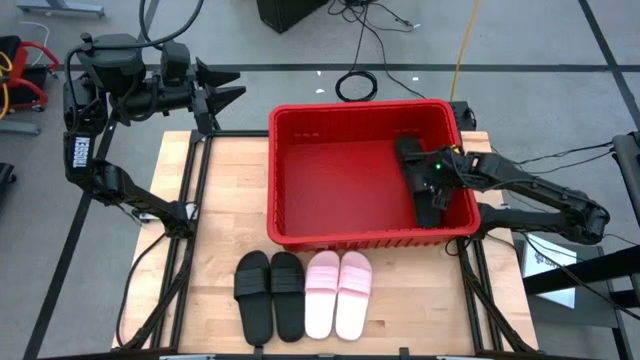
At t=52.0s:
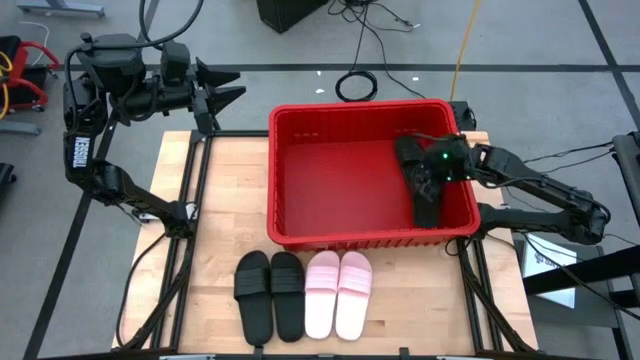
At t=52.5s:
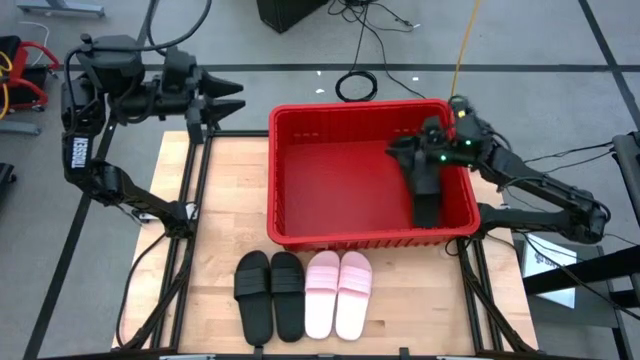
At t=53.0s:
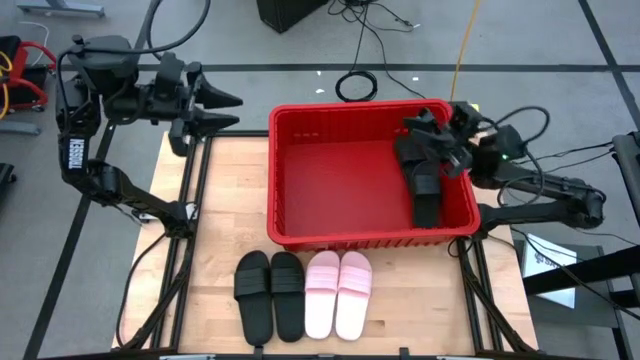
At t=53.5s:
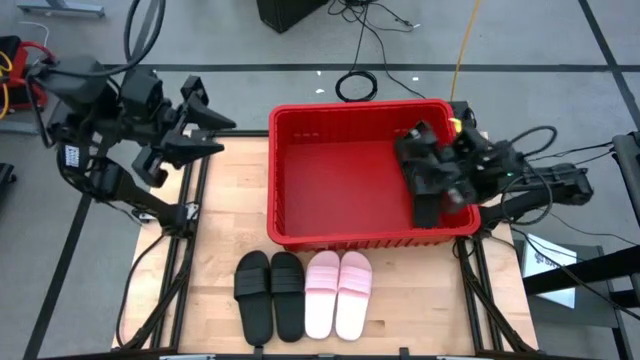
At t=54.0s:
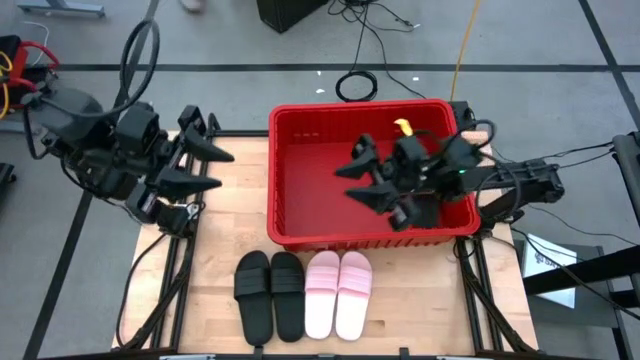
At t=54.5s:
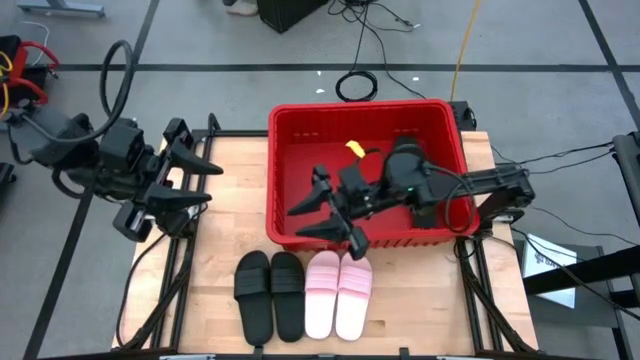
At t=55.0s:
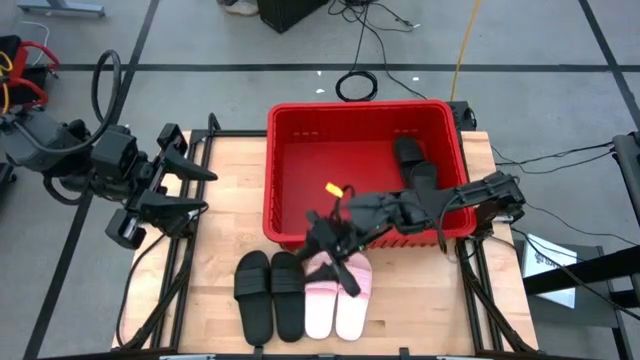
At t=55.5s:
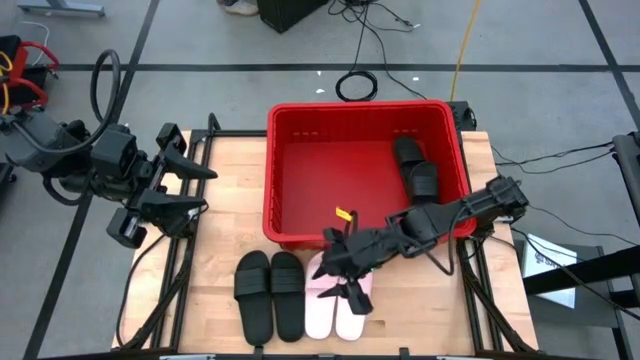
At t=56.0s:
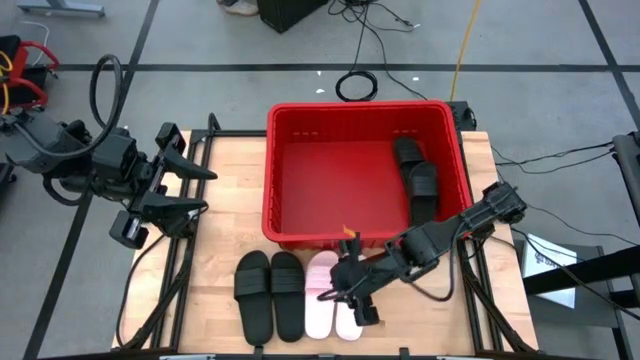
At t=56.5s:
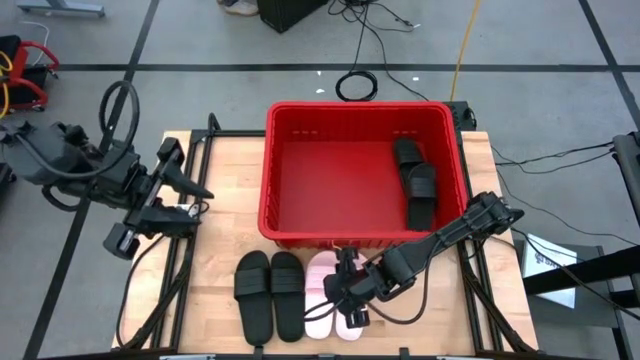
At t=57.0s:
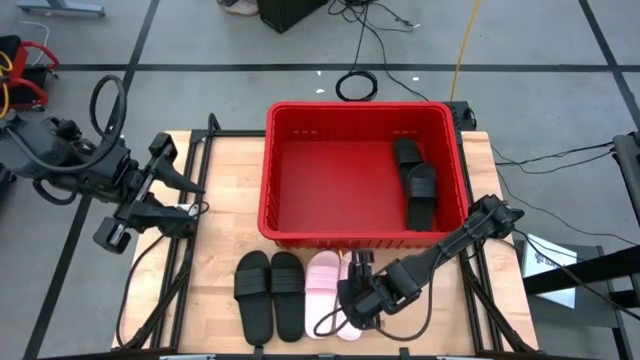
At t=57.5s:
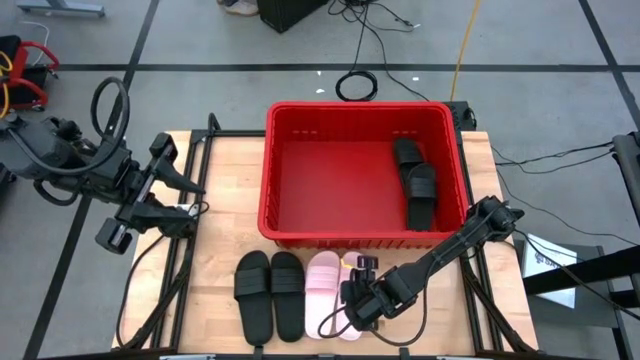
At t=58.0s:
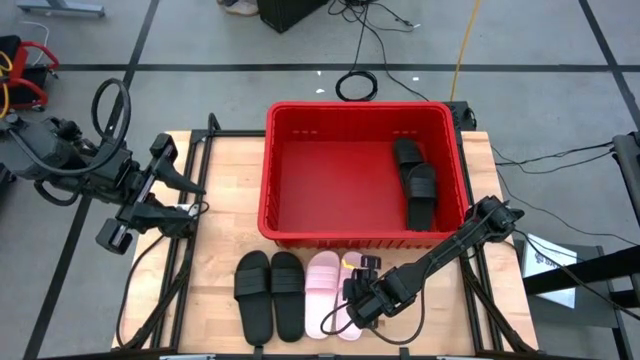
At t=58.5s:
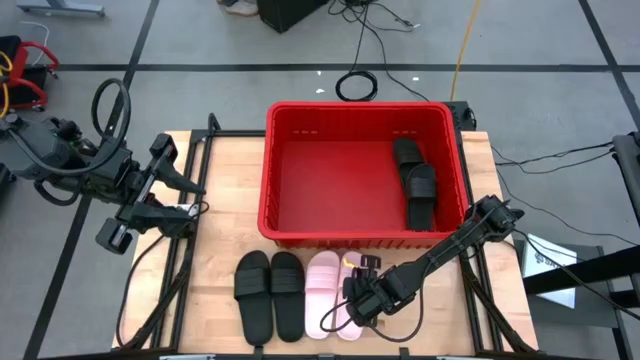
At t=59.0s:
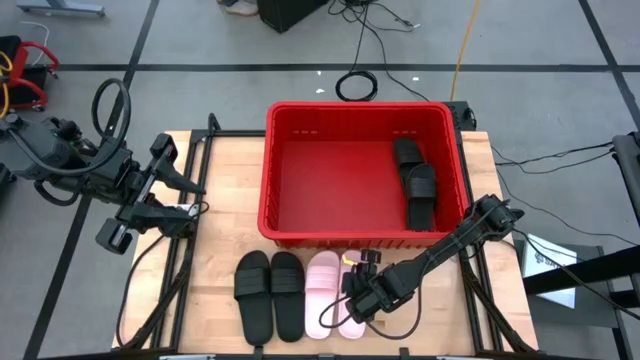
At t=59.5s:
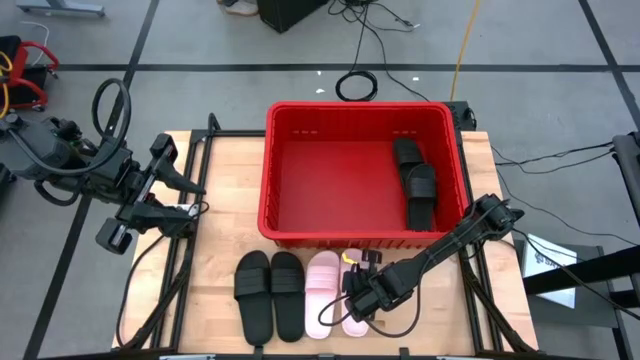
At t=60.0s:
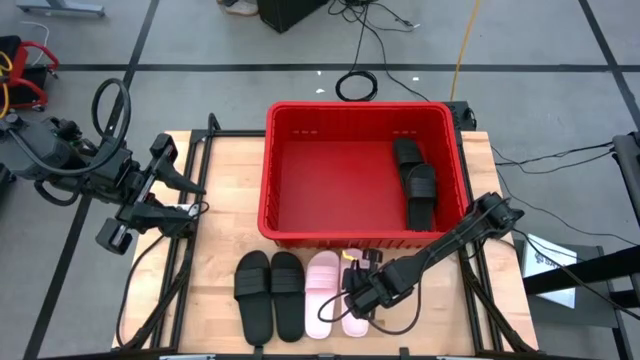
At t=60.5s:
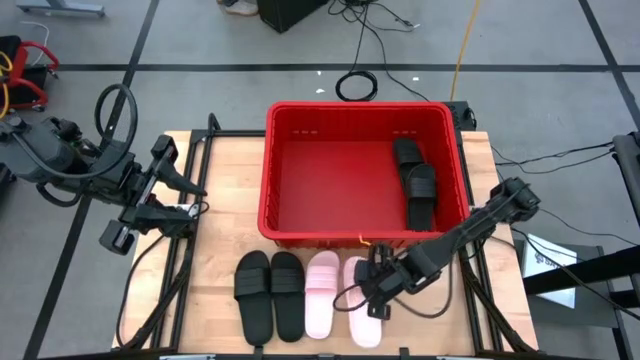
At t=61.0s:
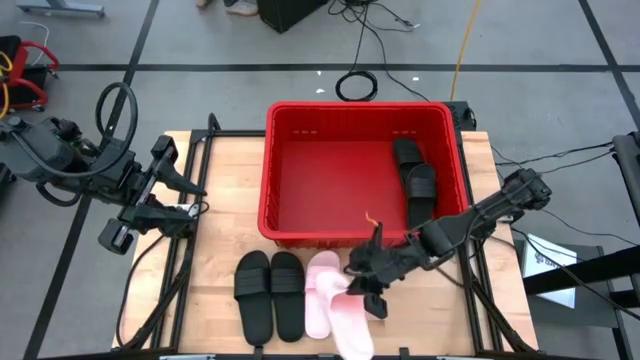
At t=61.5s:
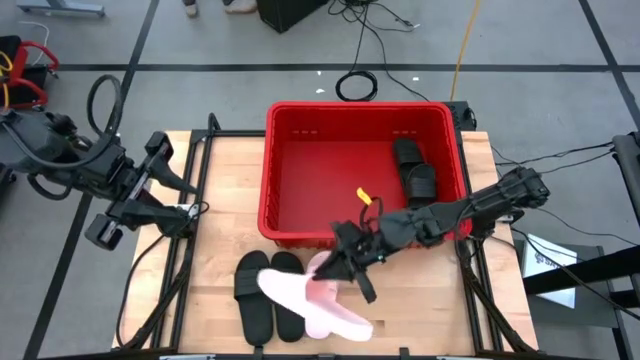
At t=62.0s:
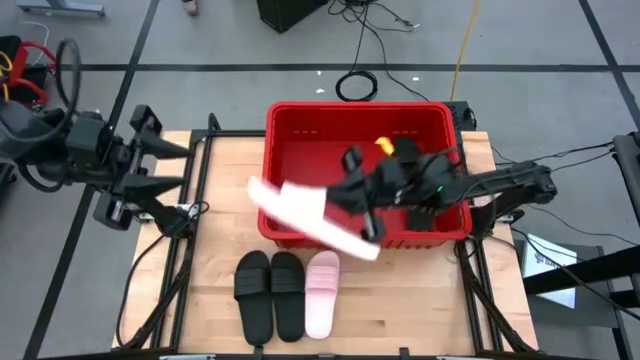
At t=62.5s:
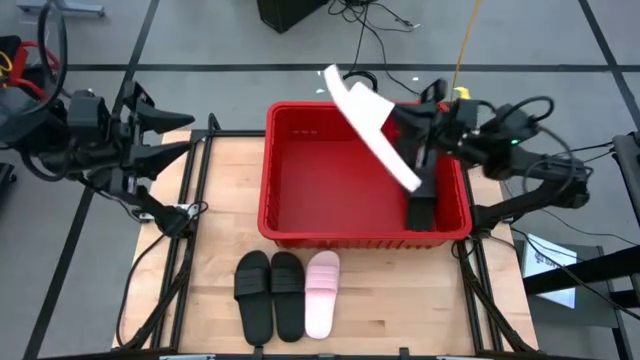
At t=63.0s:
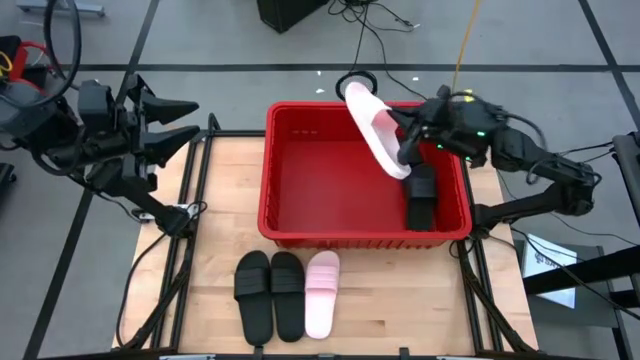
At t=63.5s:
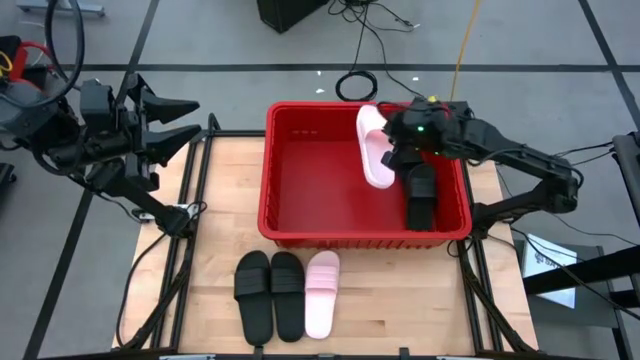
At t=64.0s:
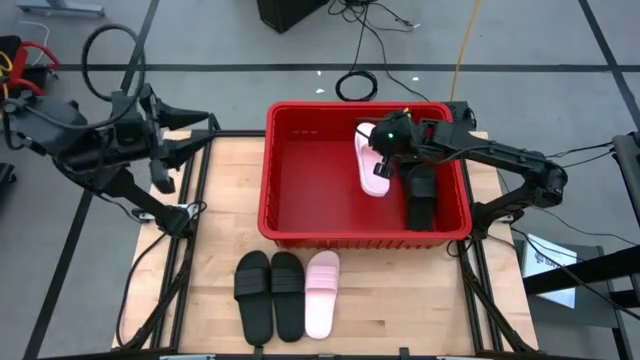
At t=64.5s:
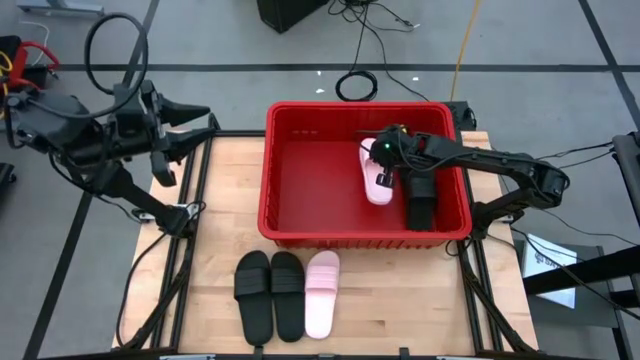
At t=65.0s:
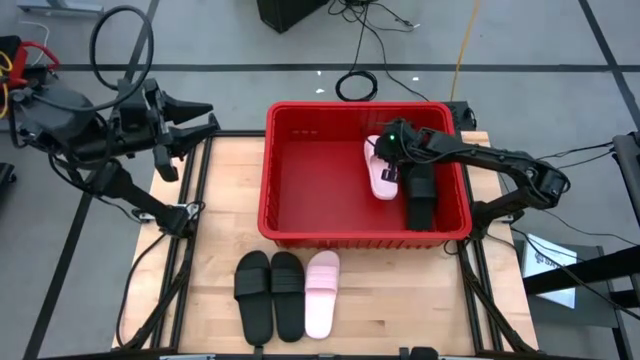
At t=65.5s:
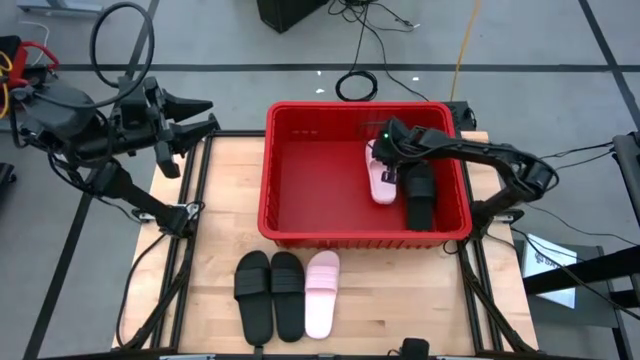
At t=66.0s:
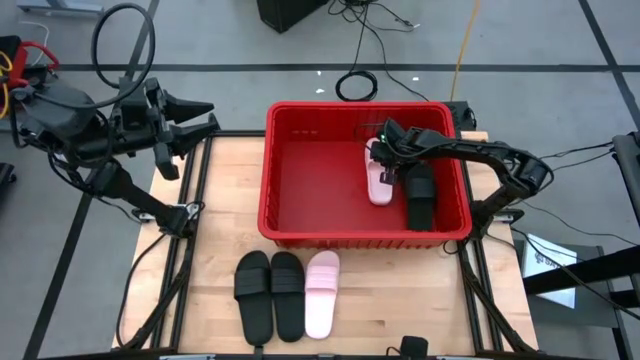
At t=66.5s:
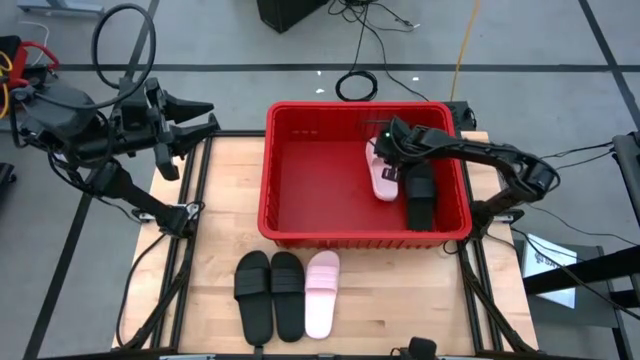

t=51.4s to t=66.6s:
Task: Pick and place slides into bin
Put the pink slipper into the red bin
